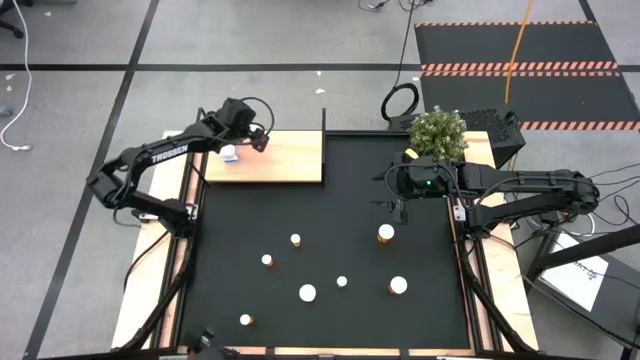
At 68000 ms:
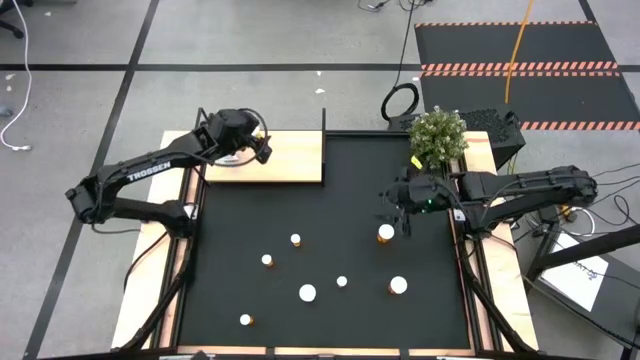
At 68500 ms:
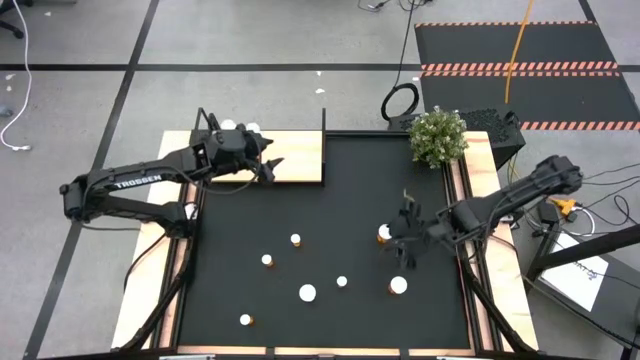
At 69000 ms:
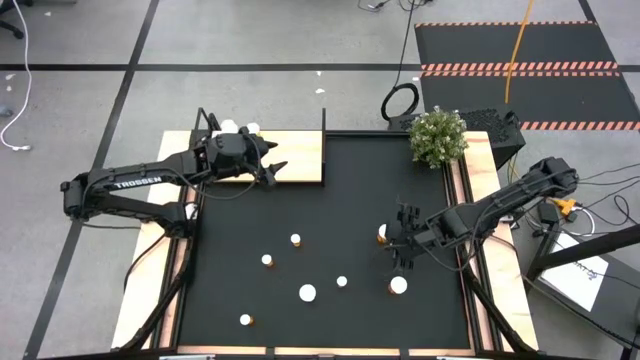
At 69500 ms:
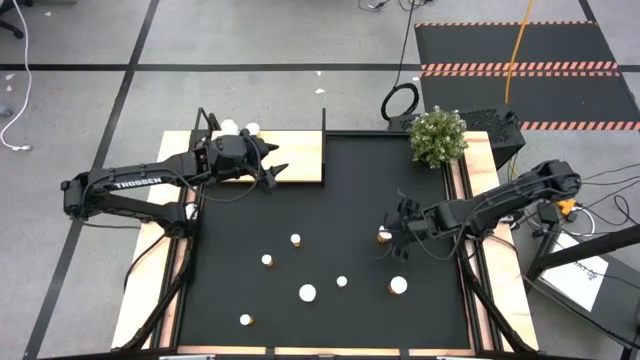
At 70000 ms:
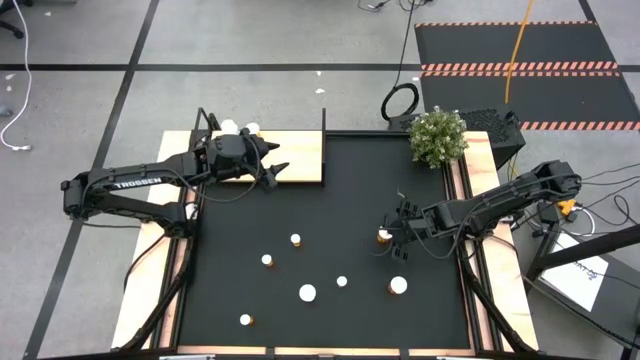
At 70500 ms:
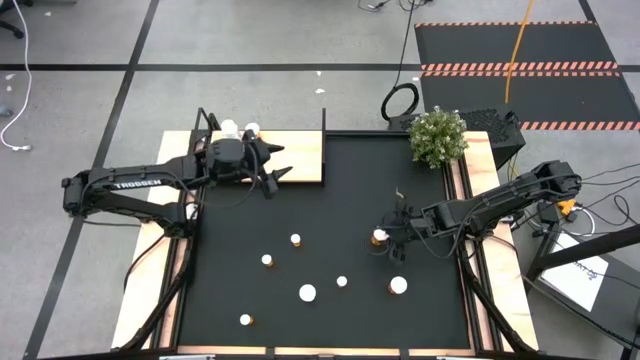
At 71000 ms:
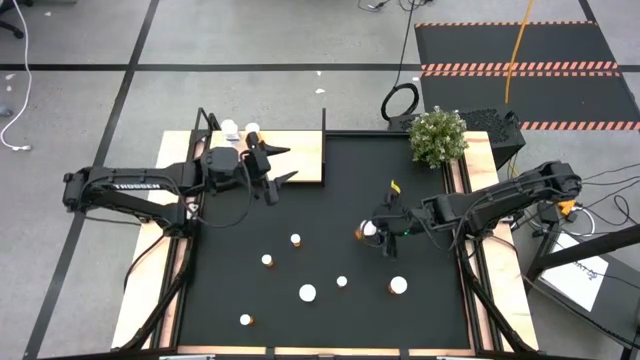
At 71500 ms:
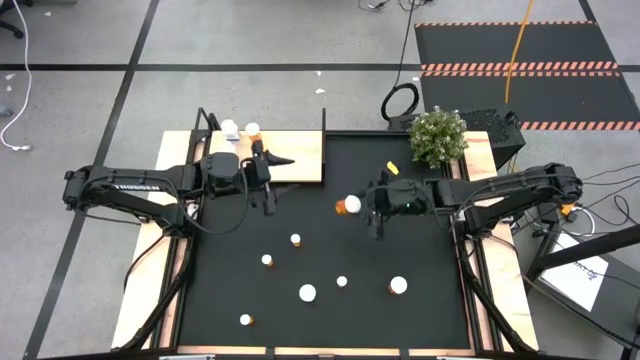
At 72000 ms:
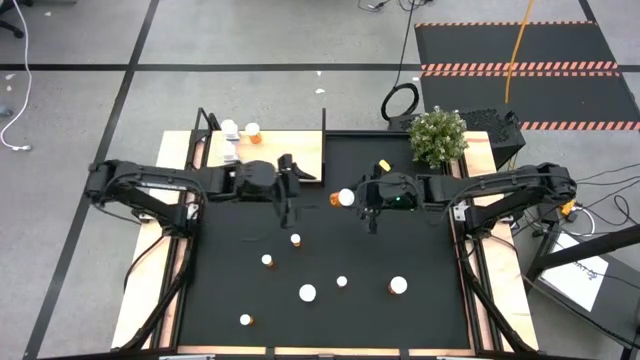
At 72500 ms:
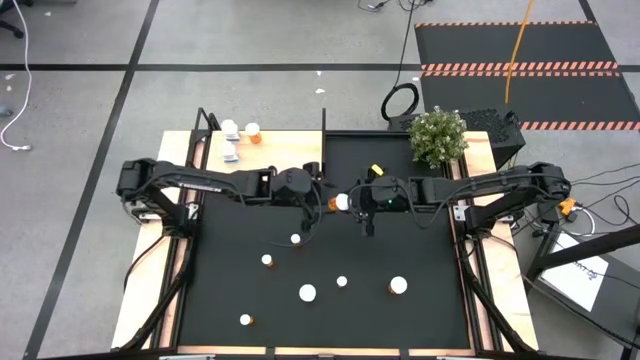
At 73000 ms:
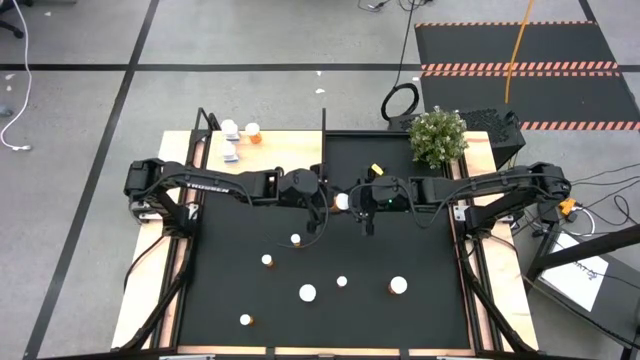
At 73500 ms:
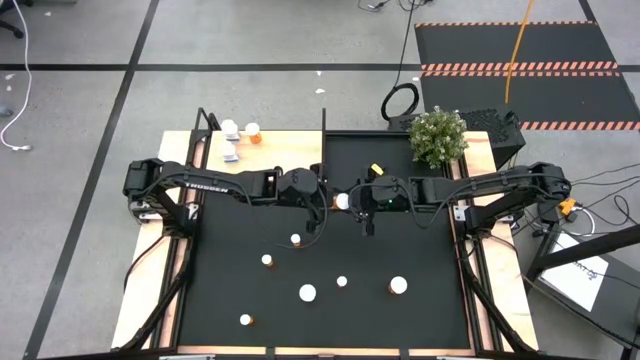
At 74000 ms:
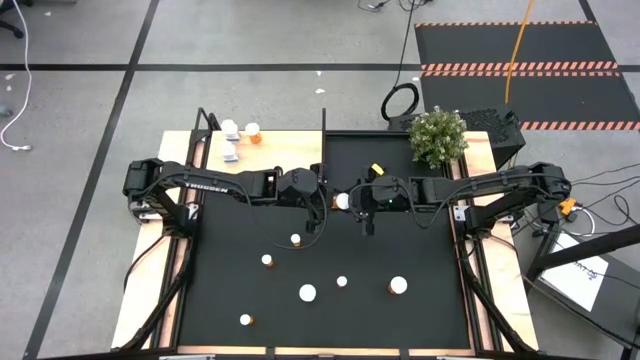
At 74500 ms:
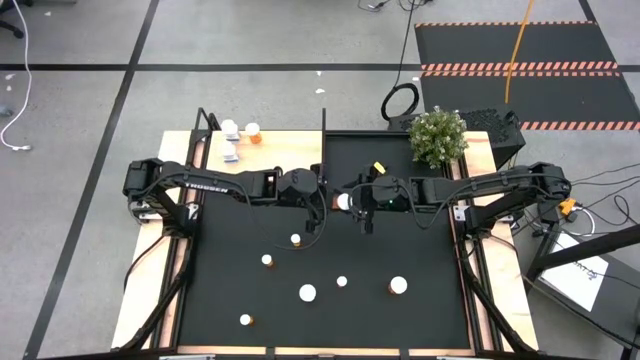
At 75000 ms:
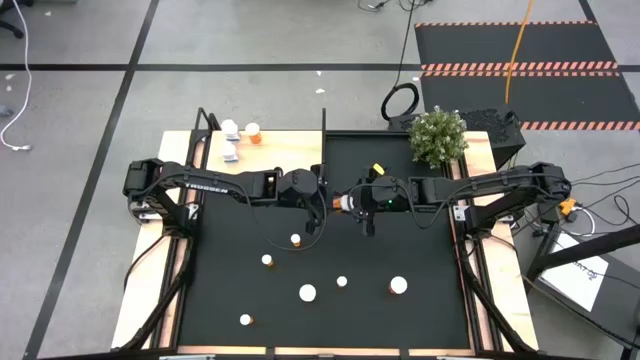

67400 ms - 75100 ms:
Task: Pick and place medicine bottles onto shelf by color
Put the large orange pill bottle aligned with the other large orange pill bottle on the shelf

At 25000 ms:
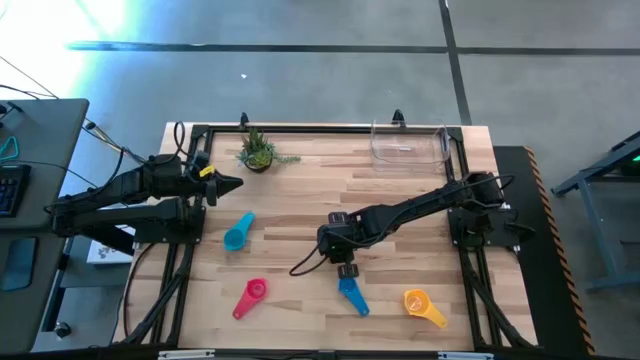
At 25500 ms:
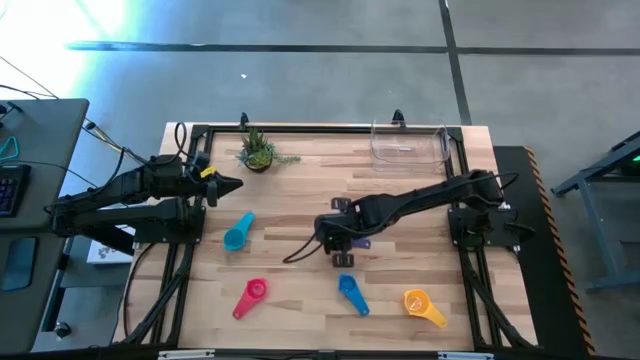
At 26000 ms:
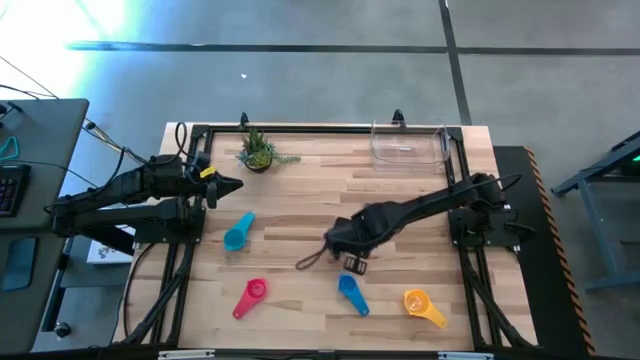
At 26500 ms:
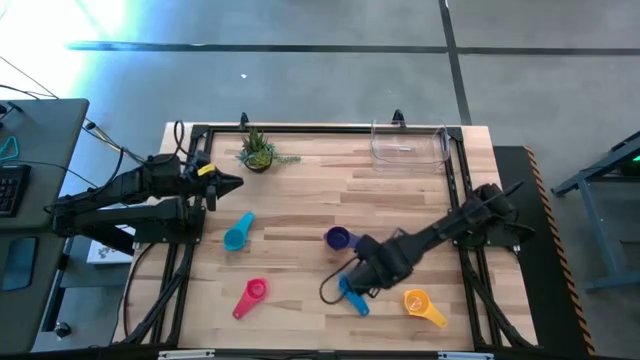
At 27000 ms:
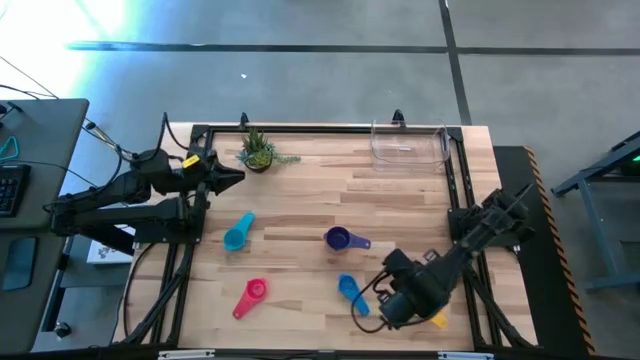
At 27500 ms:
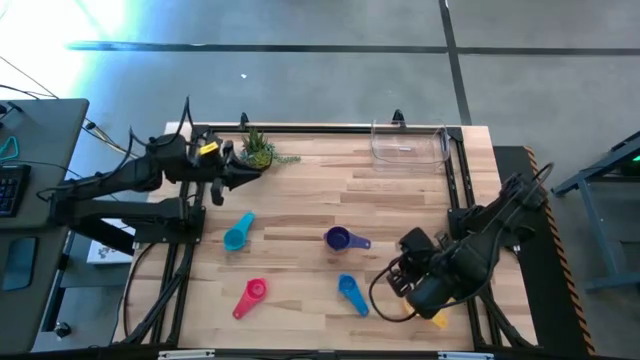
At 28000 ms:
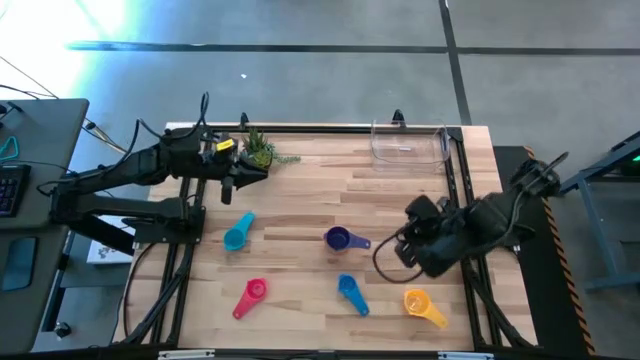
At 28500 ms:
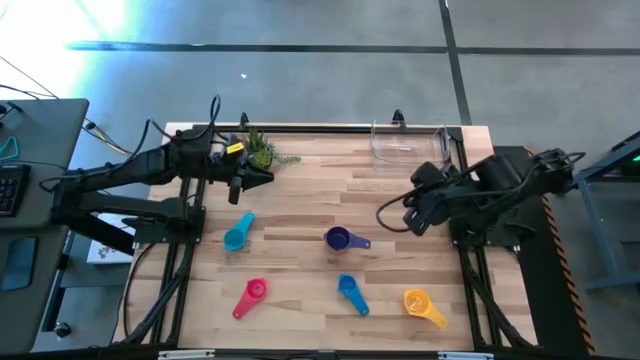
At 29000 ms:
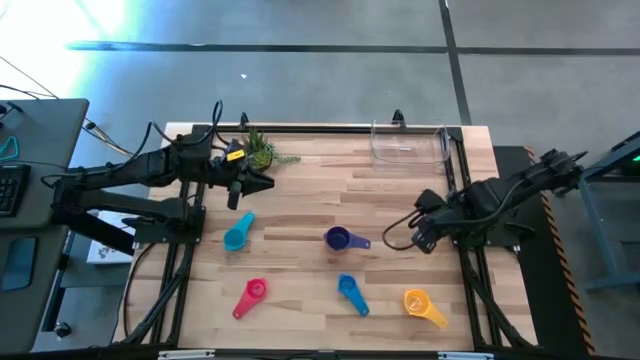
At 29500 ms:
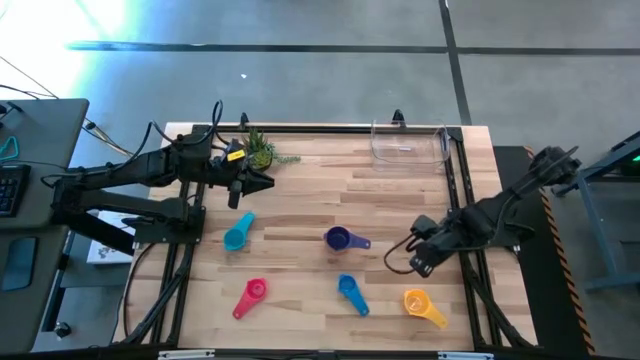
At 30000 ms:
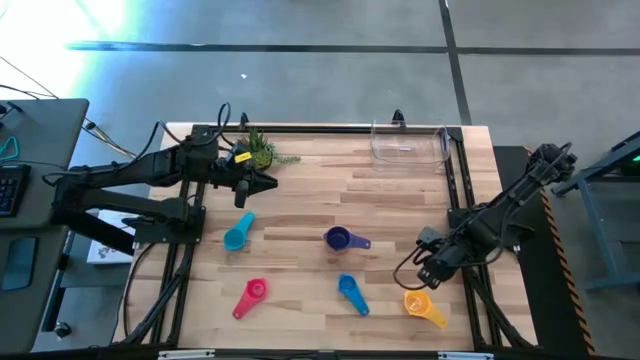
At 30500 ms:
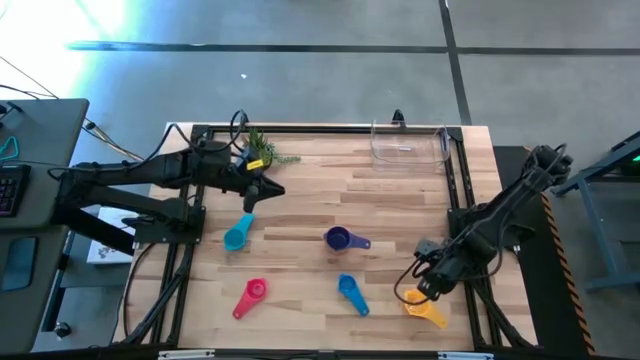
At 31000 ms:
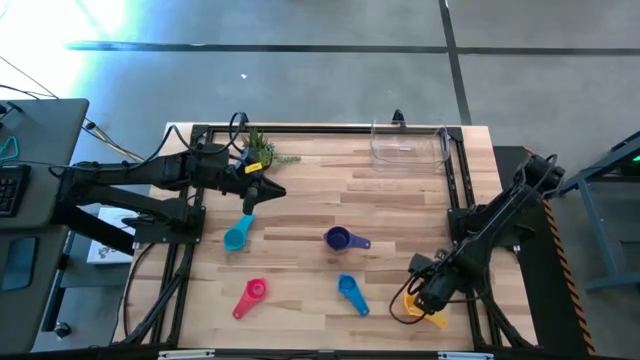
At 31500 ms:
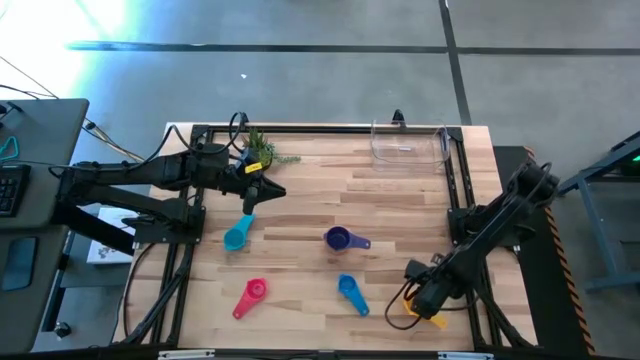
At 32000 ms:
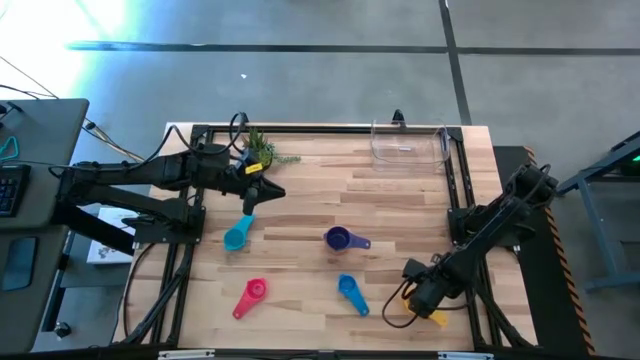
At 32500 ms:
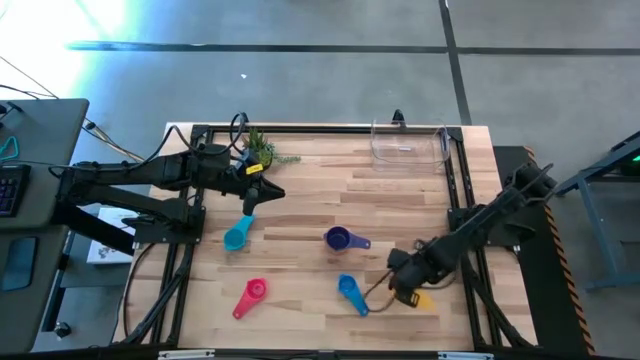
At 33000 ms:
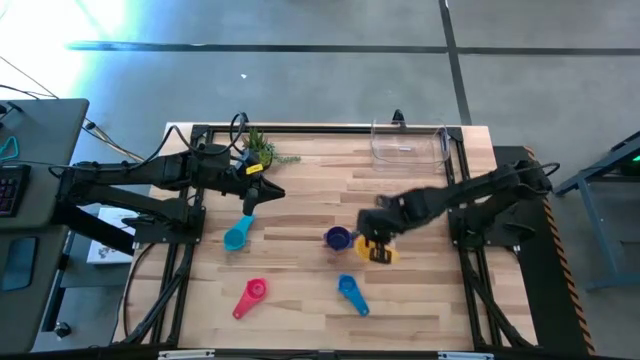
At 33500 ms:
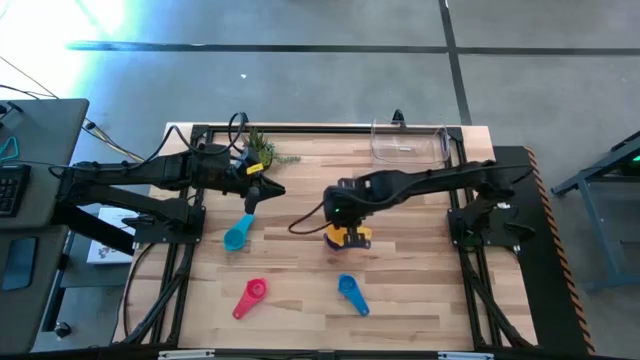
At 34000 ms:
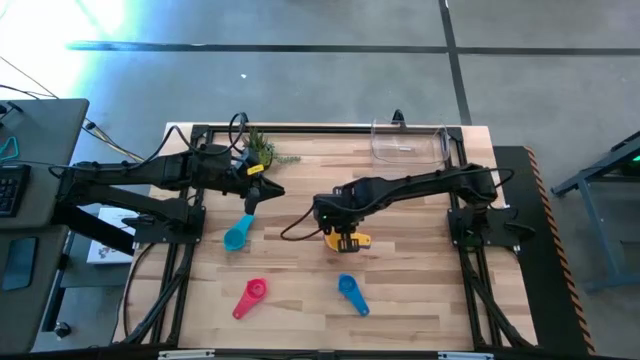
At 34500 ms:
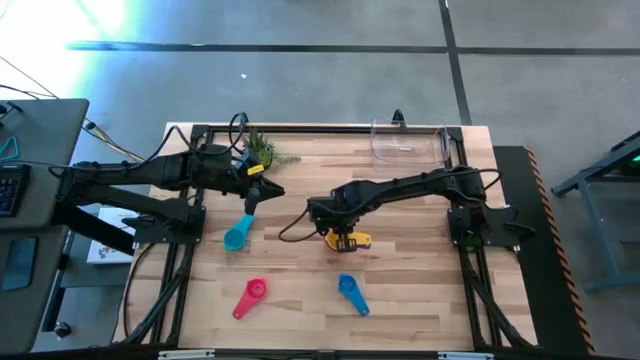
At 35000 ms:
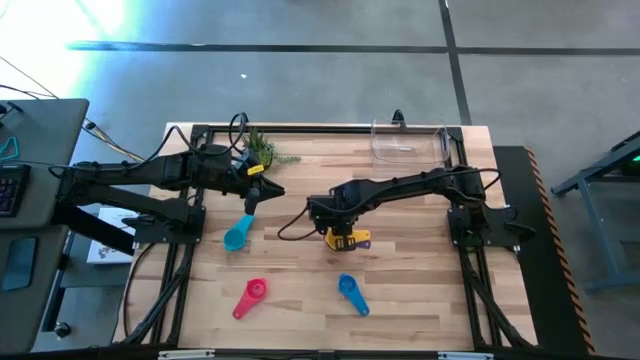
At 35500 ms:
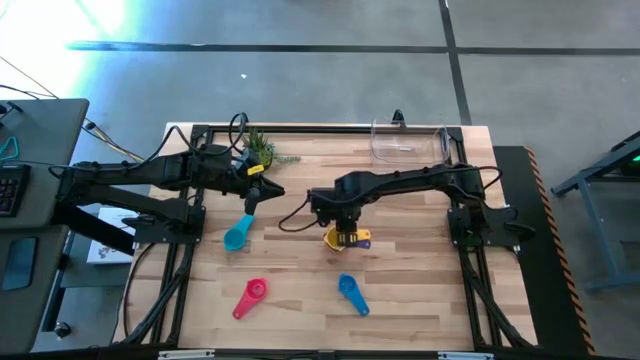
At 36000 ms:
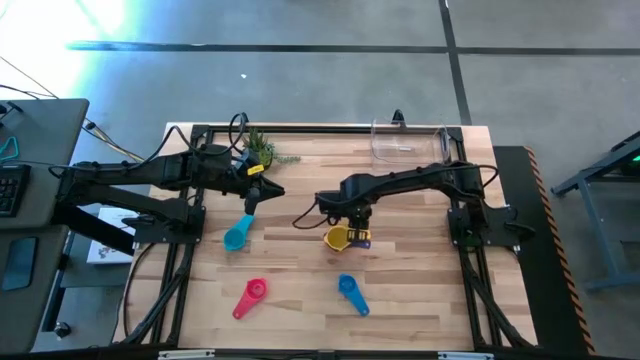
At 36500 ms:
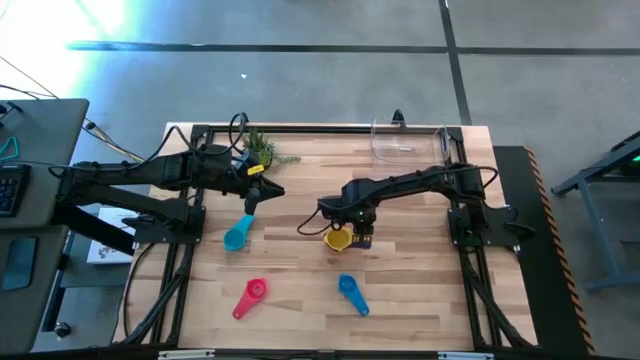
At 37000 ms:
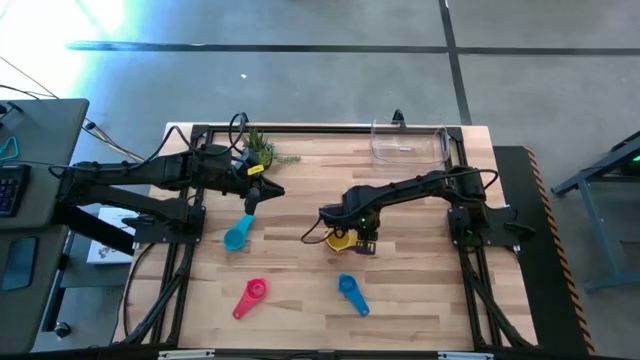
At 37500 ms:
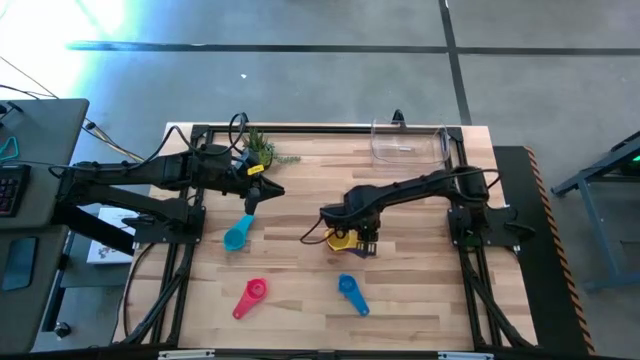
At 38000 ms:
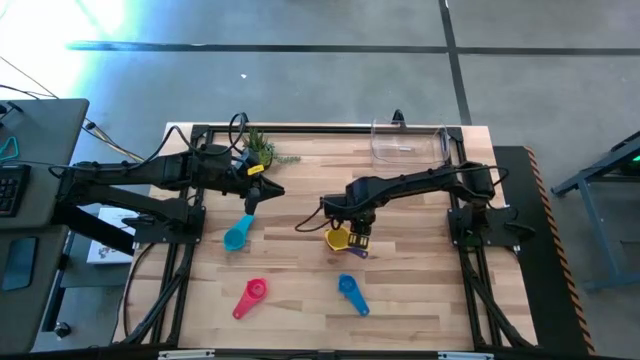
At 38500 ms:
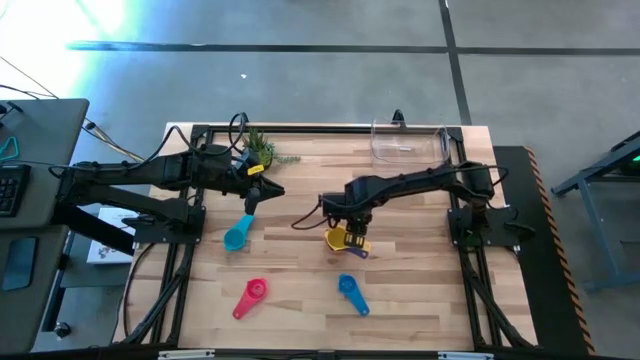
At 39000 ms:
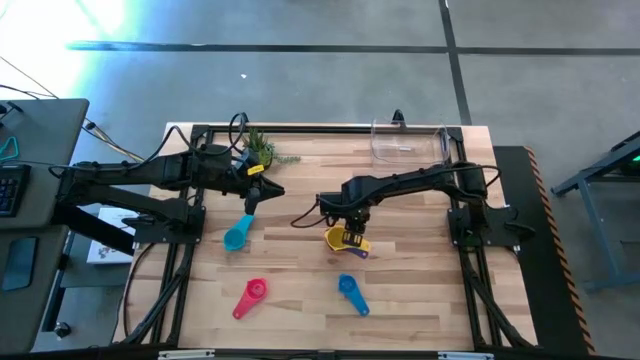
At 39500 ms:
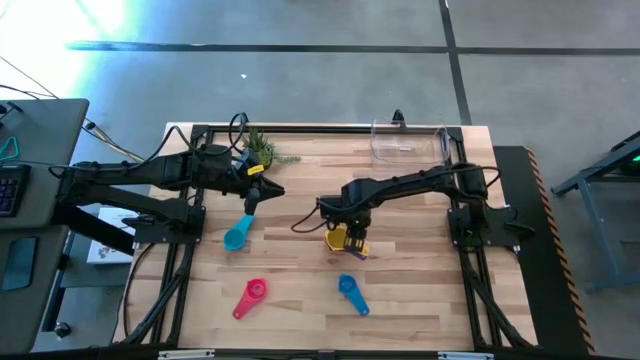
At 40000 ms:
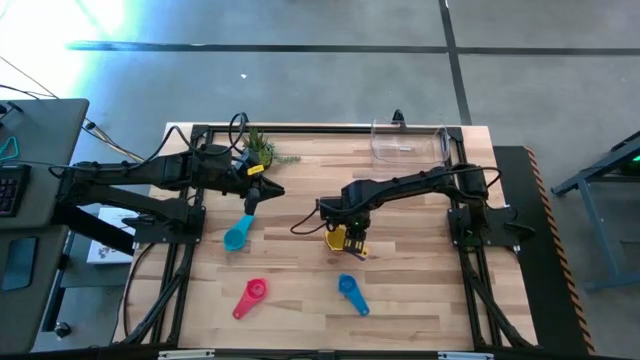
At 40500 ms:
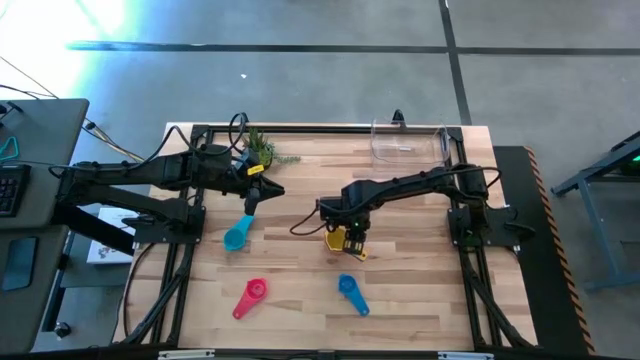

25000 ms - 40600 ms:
Task: Nest measuring cups in basket
Stack the yellow measuring cup on top of the dark blue measuring cup
